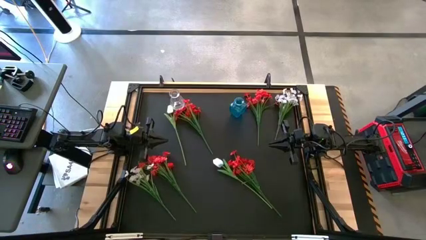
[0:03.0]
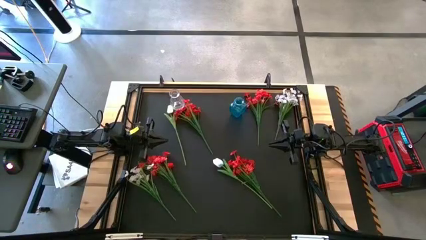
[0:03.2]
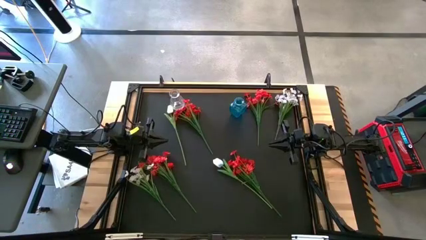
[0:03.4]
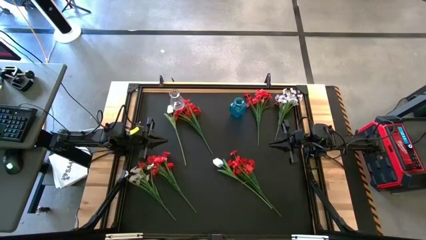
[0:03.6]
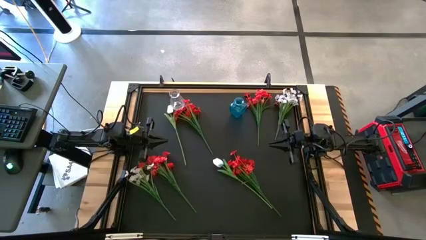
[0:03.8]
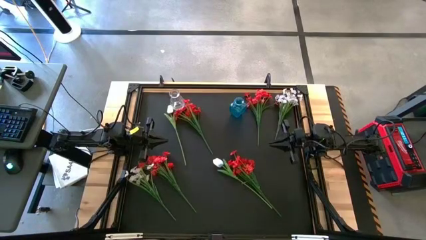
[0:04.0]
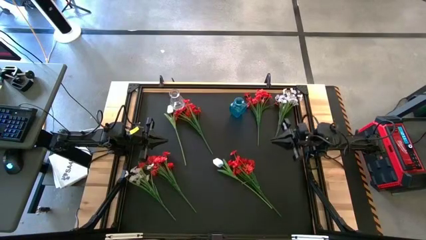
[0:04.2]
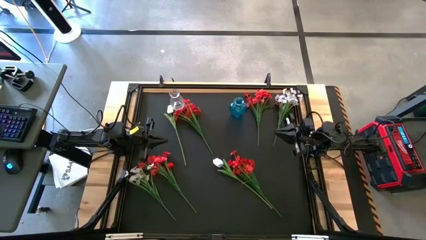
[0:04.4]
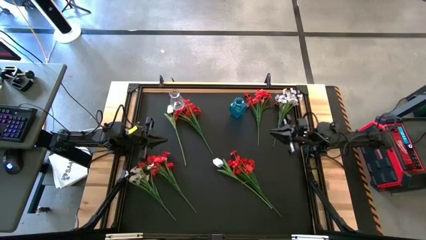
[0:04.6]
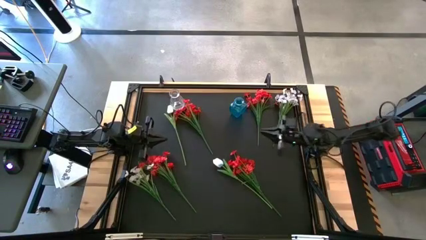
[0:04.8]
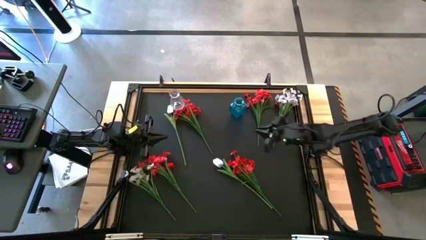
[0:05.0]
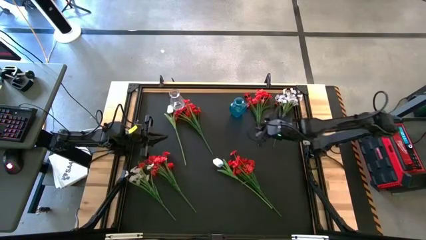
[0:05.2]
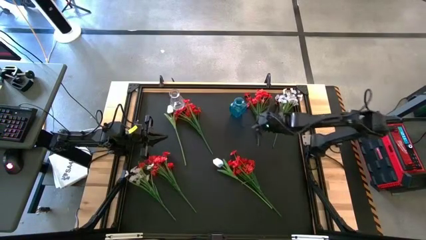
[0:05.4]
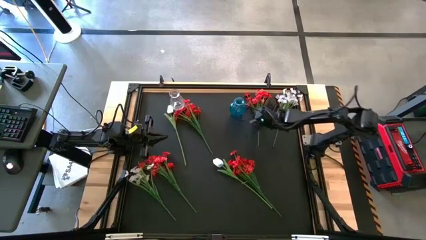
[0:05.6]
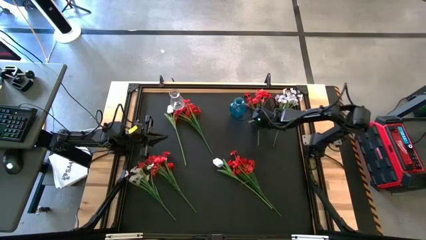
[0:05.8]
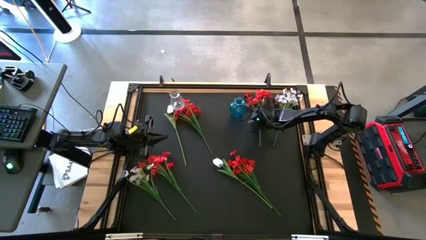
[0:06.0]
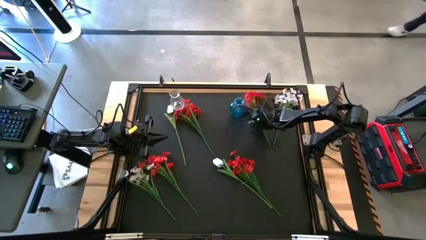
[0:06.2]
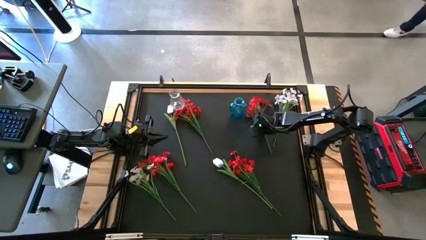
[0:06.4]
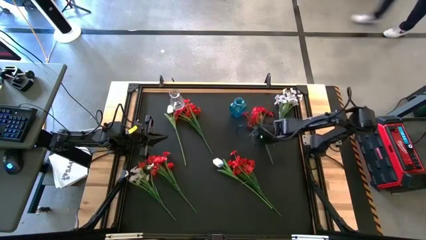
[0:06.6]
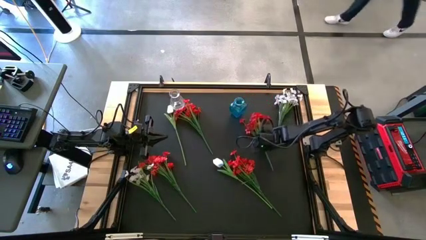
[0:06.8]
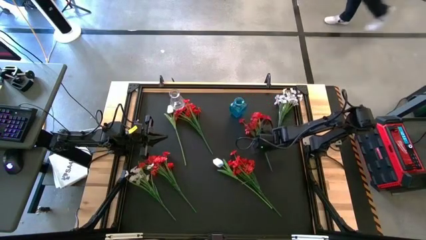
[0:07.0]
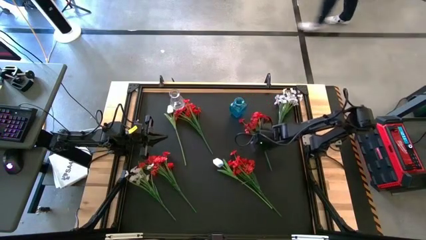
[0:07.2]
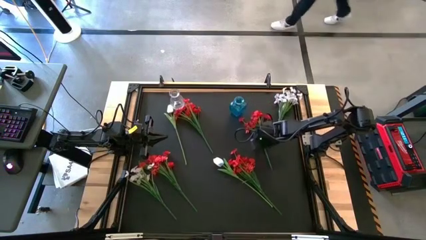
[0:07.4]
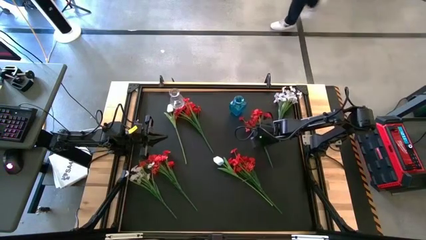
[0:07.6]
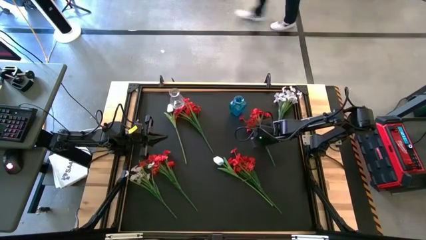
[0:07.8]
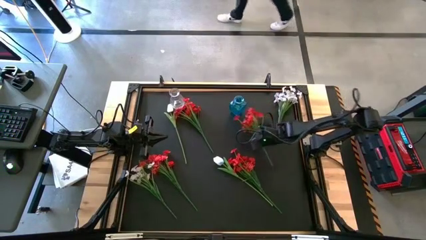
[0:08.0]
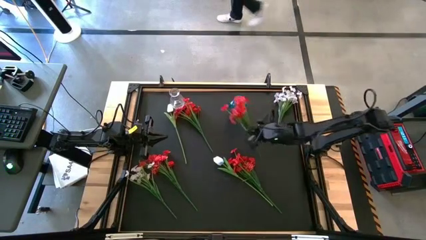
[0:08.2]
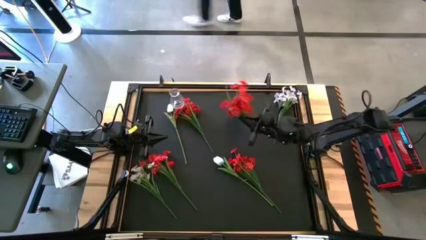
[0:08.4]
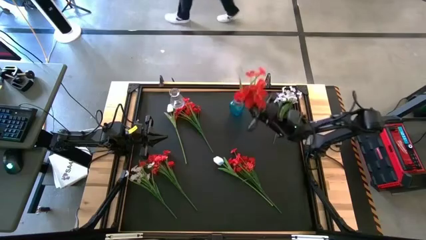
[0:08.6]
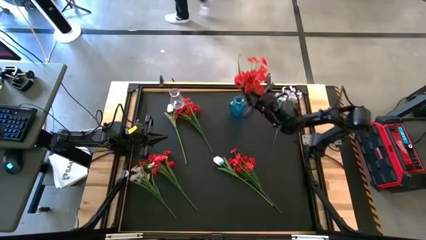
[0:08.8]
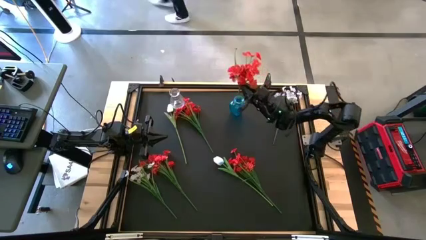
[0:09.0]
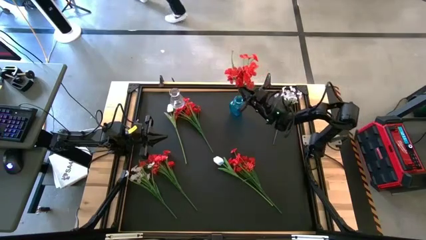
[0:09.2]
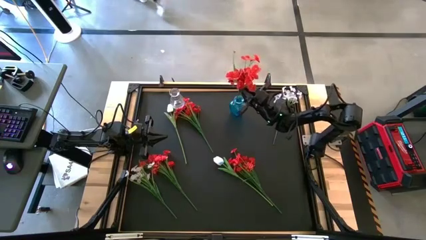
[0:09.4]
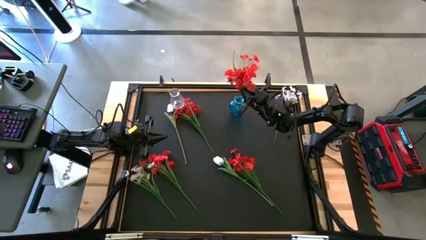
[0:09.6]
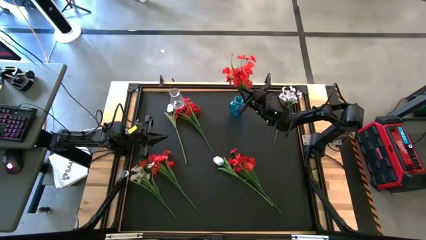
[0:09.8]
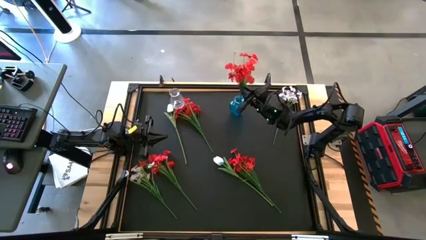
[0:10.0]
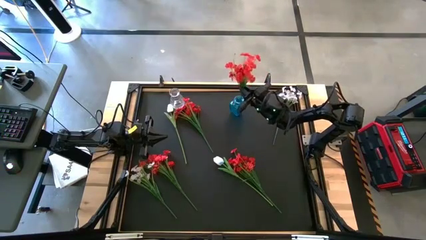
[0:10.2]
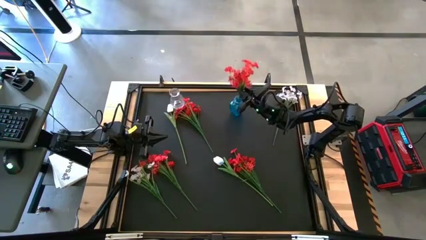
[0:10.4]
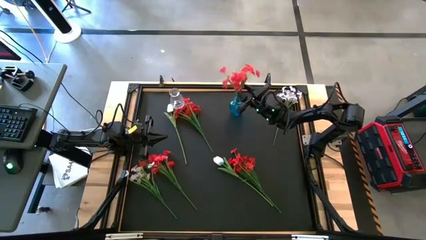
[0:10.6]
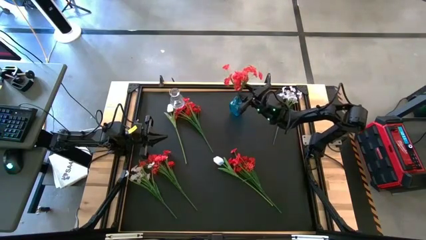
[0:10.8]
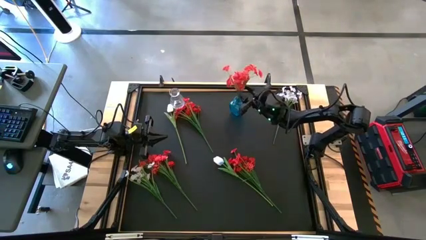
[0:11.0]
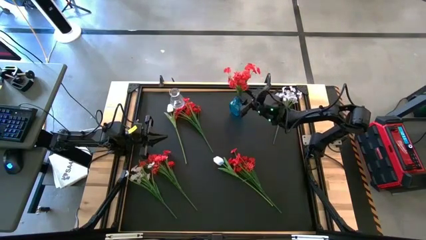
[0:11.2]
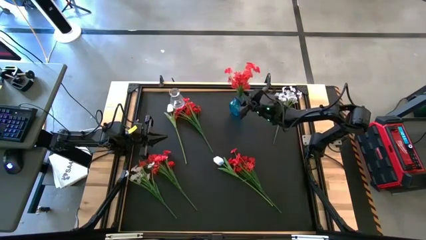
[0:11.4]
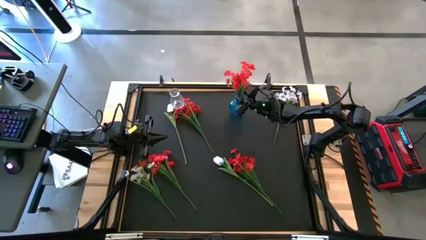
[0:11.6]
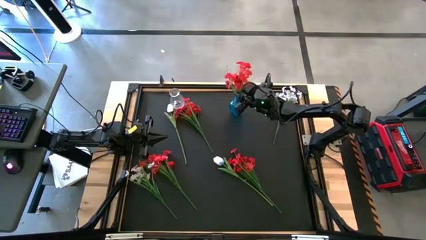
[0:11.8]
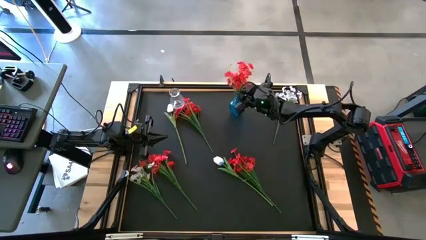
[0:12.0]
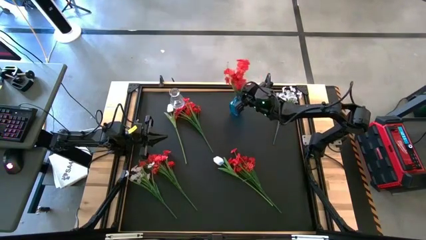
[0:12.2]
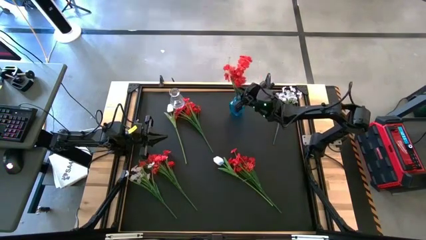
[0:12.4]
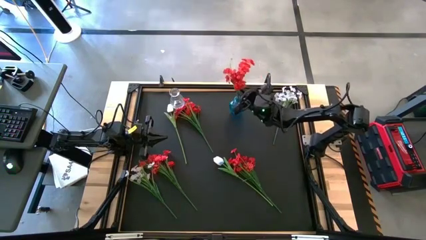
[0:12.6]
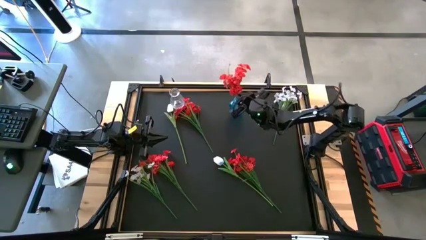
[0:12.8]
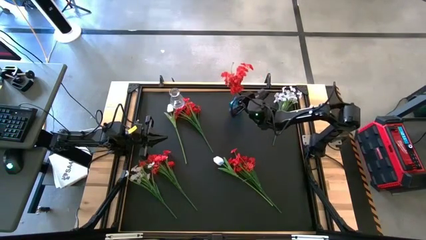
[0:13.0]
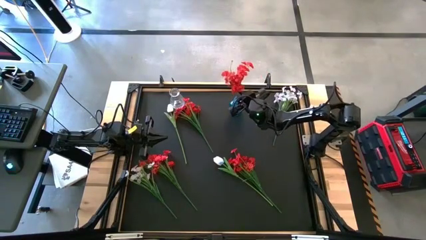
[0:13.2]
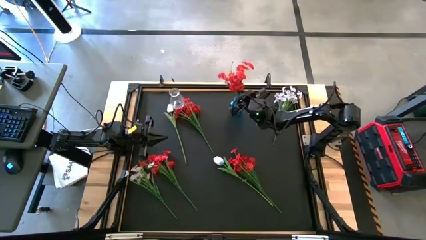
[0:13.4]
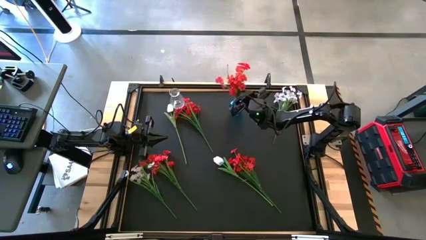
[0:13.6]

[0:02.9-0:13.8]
Task: Sort flowers into vase by color
Put the top right red flowers into the blue vase

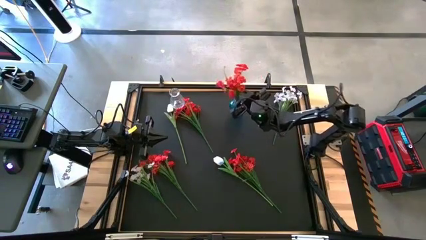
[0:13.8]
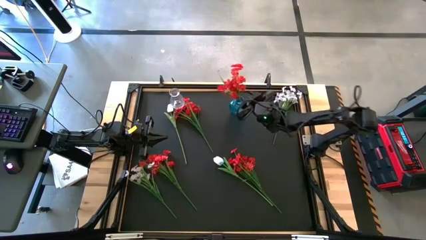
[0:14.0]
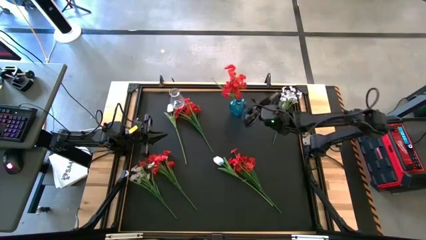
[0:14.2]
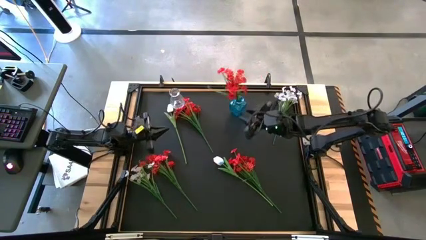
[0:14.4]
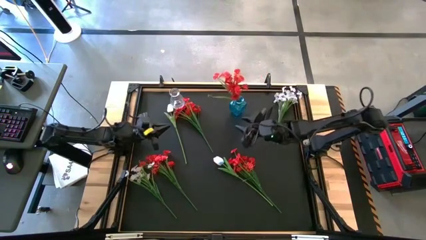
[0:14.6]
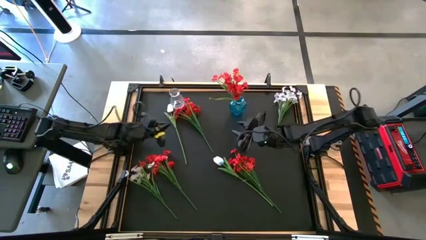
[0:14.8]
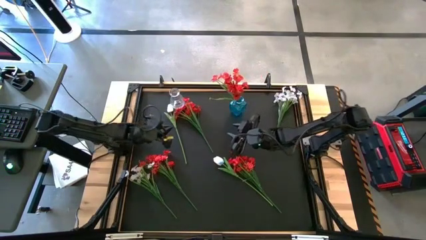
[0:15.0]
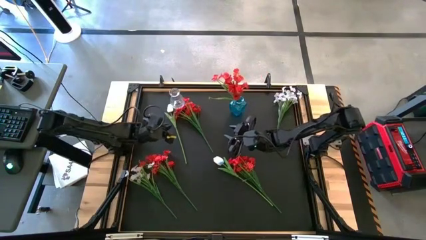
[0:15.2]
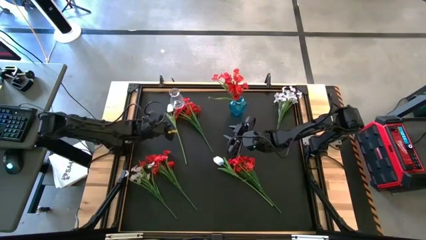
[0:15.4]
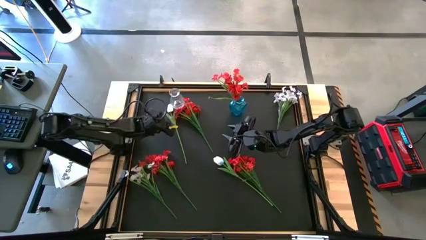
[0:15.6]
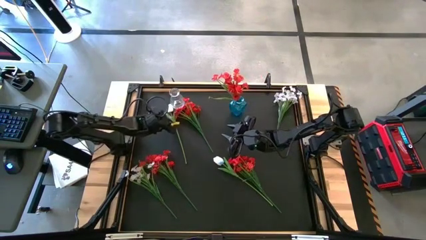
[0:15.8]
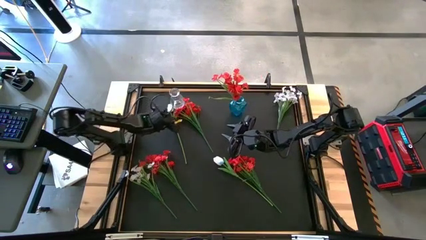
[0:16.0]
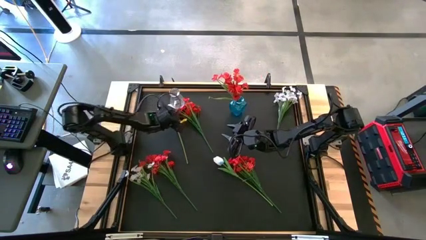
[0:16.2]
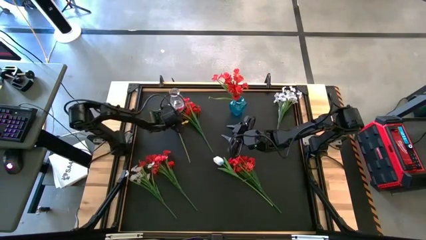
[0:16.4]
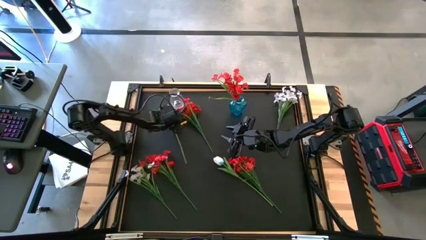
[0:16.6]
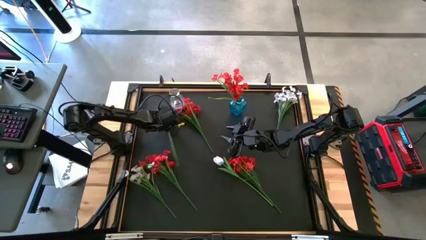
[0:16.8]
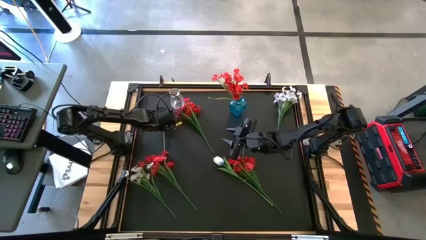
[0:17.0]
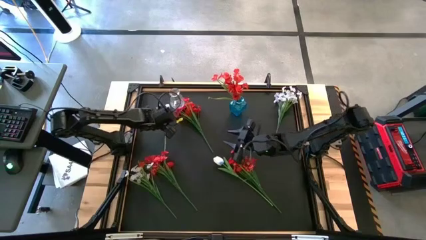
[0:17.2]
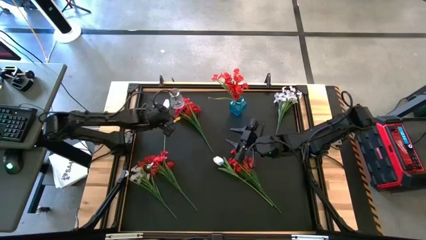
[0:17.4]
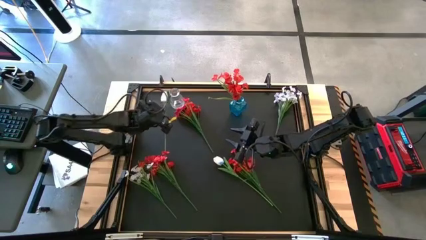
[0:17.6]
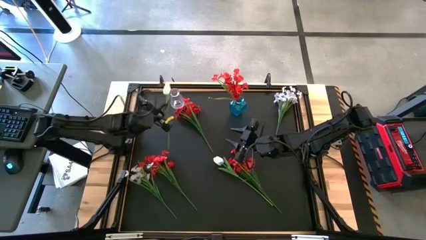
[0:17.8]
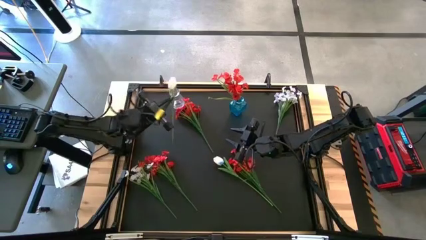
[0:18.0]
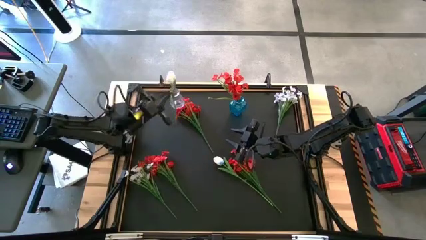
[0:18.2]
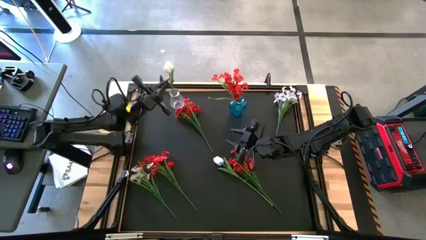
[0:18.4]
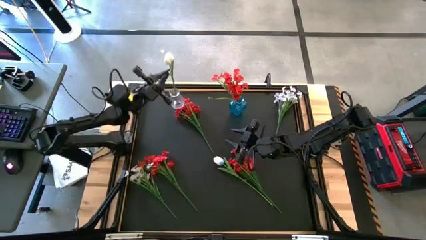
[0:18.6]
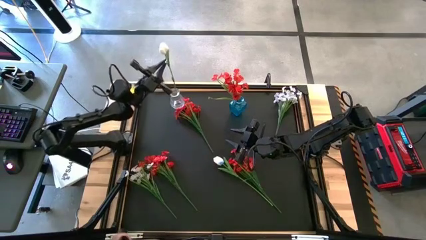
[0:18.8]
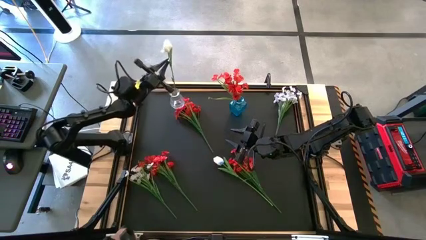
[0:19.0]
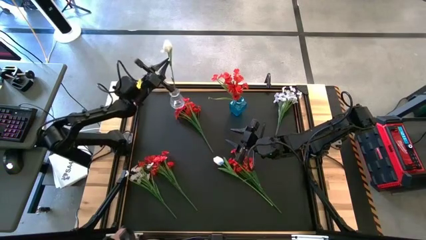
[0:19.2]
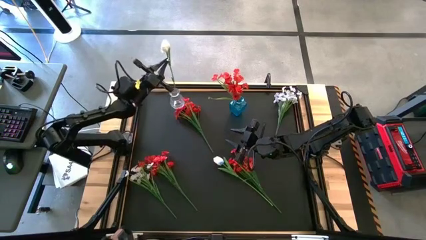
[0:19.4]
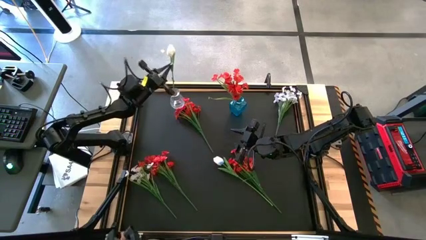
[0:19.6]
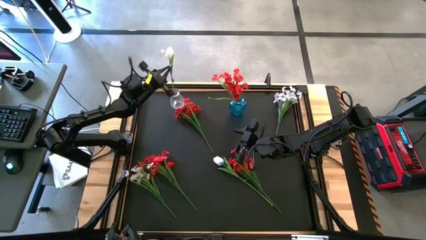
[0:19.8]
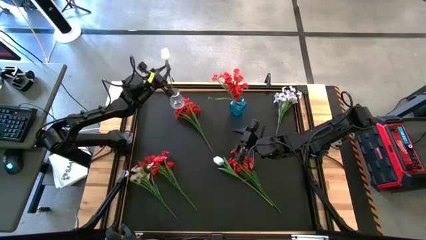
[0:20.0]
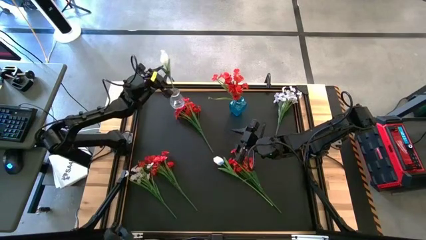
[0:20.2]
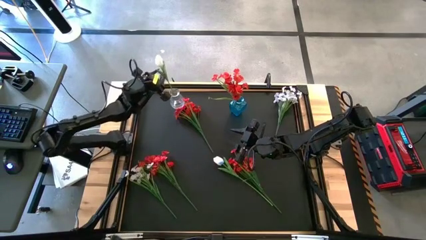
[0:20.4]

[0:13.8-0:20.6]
Put the top white tulip into the transparent vase
